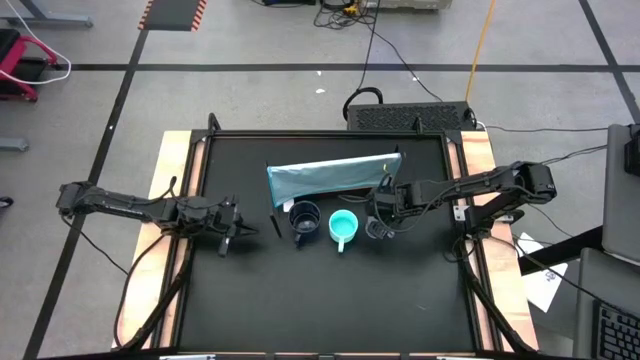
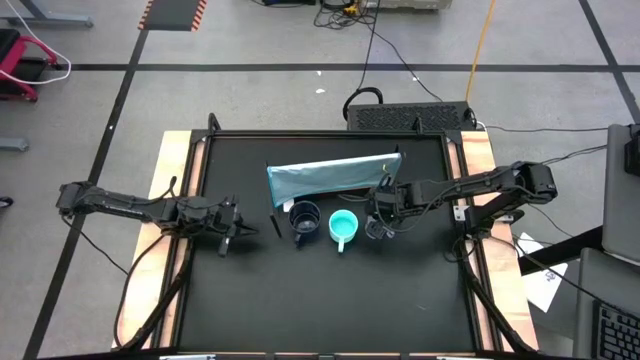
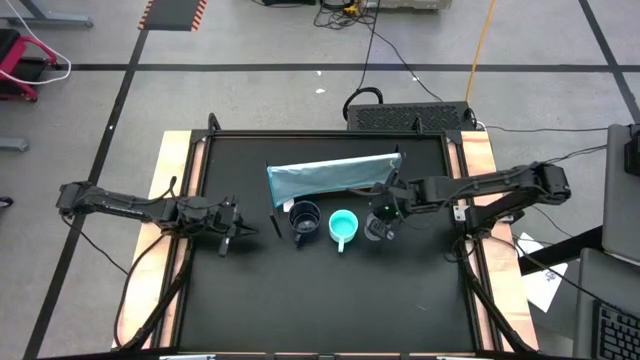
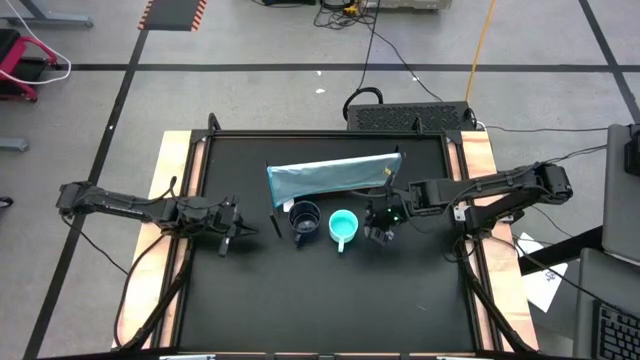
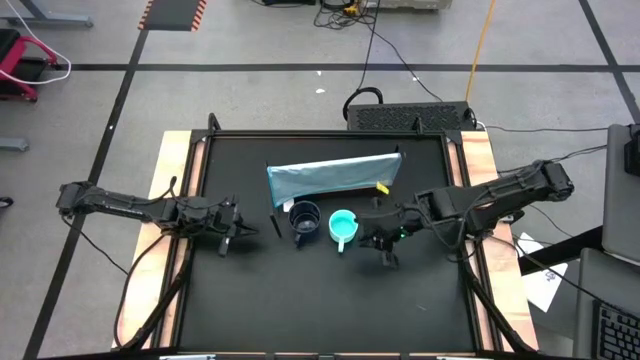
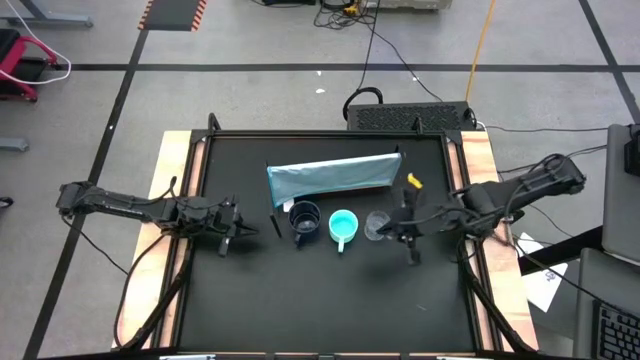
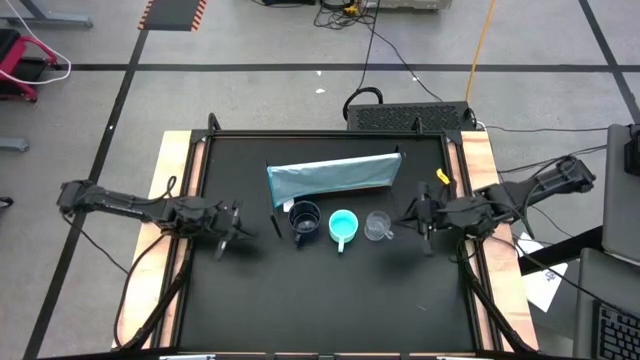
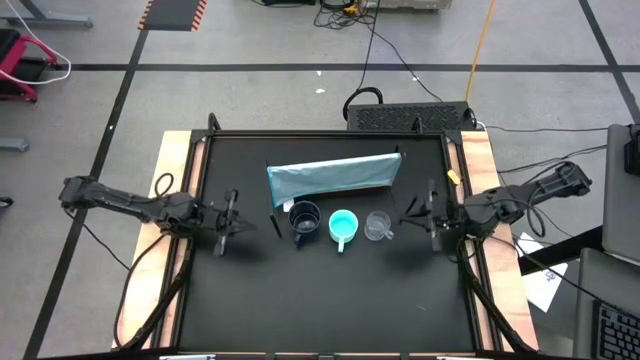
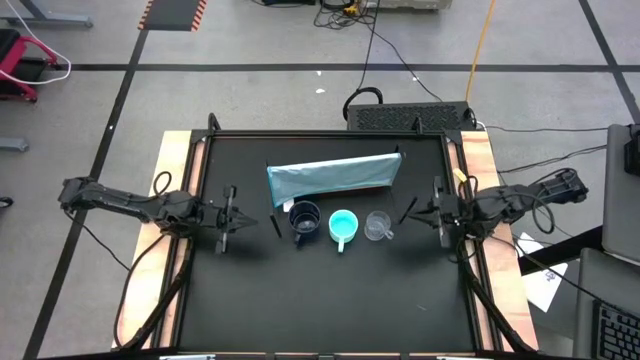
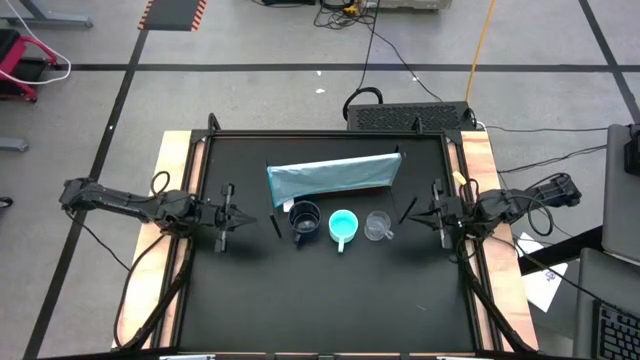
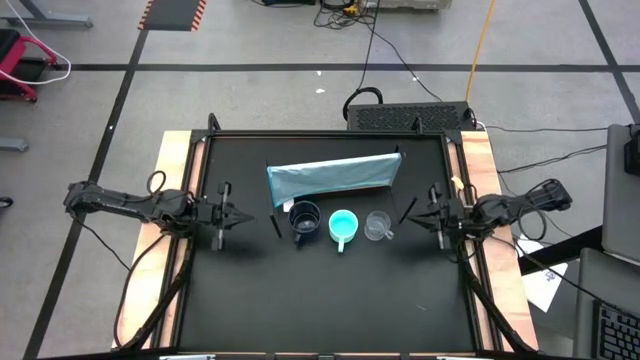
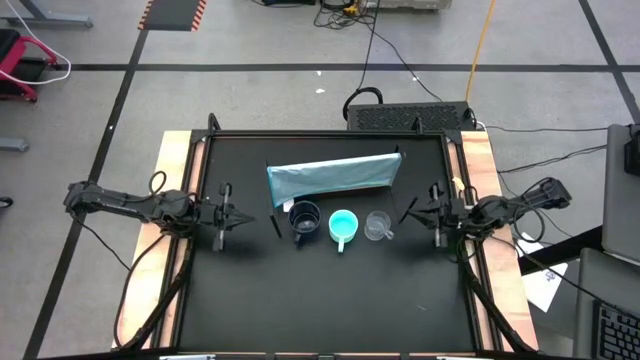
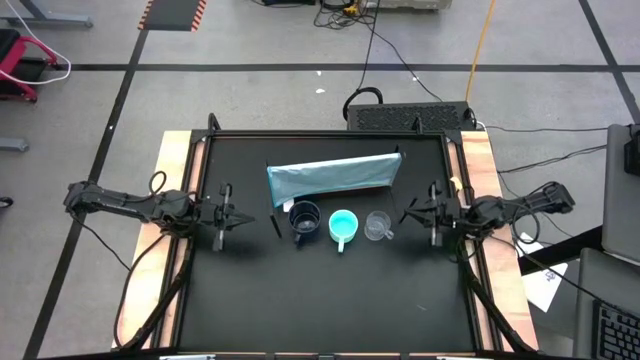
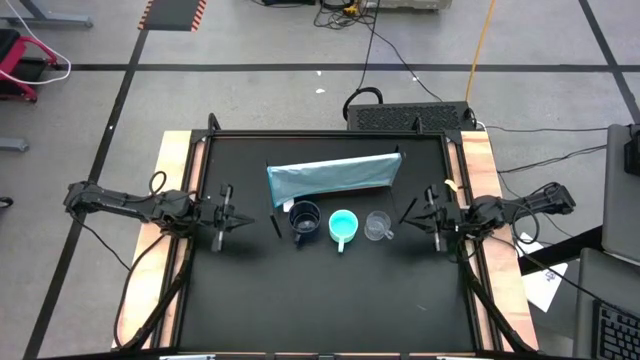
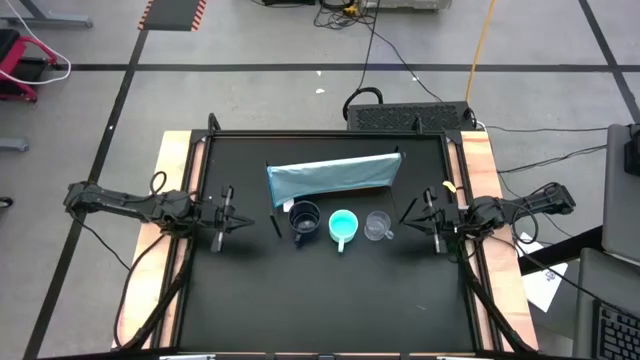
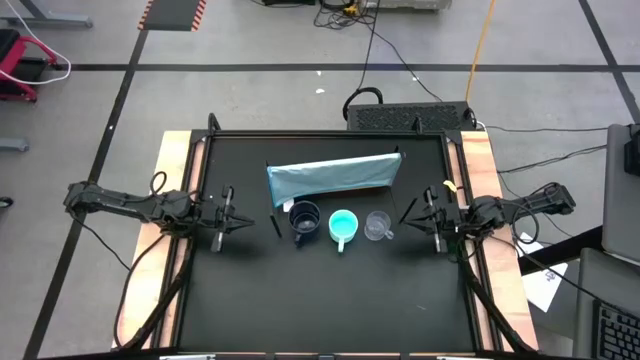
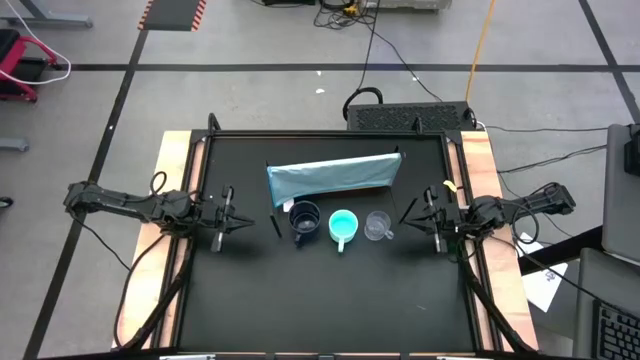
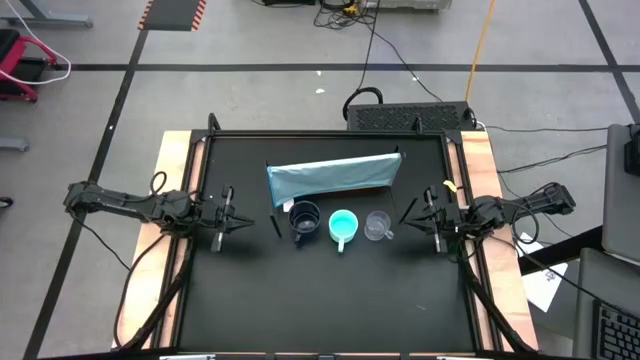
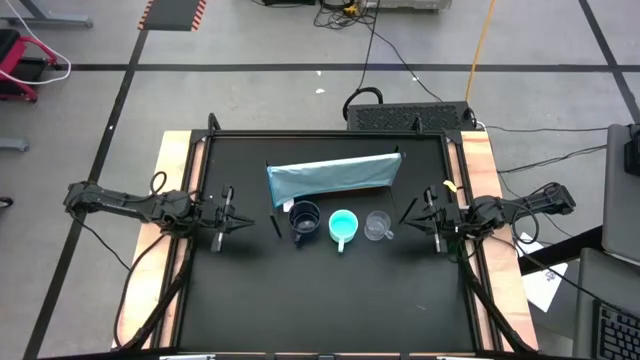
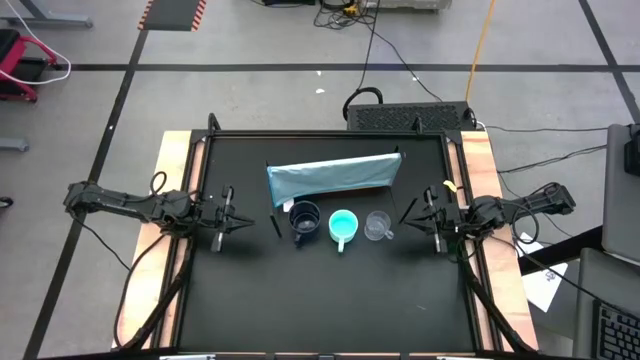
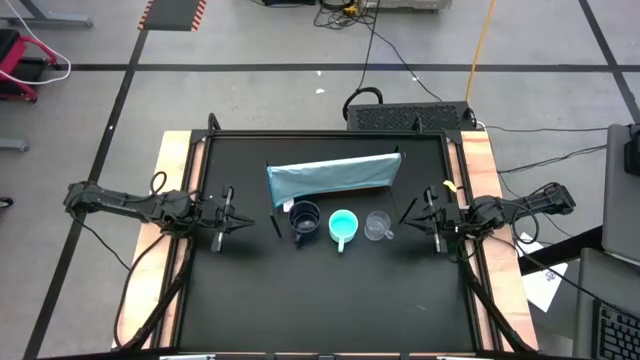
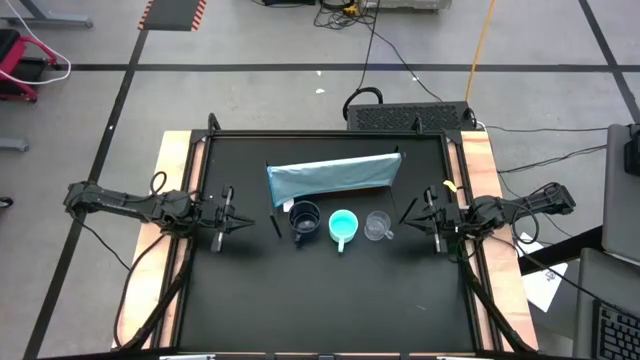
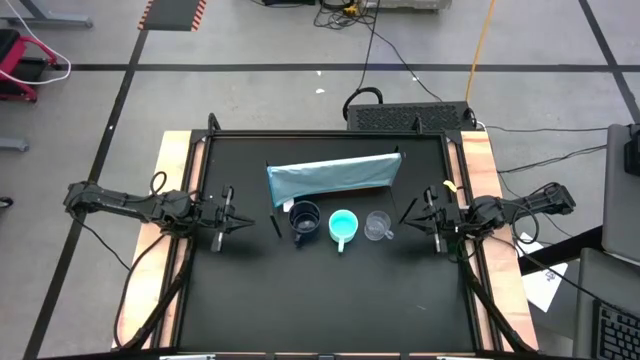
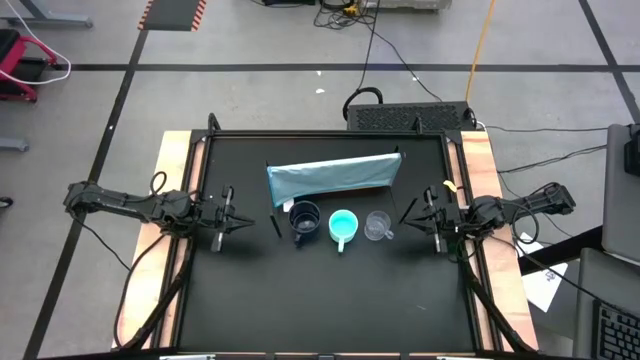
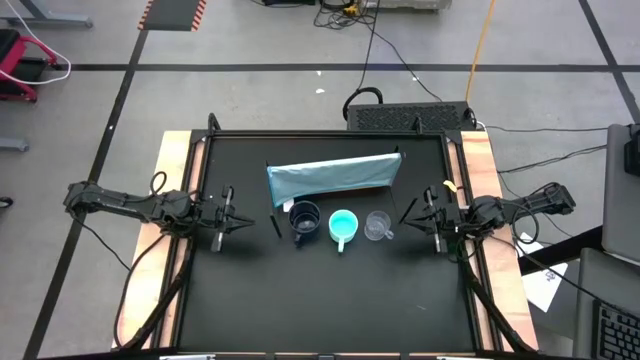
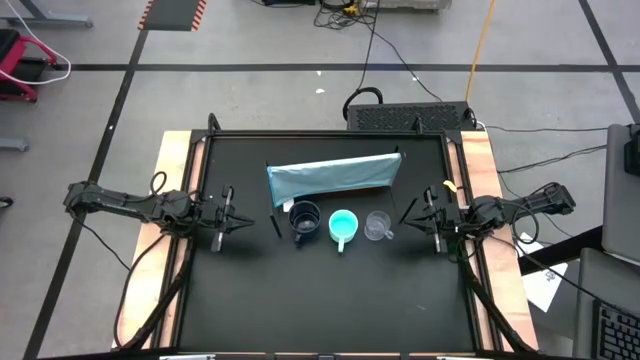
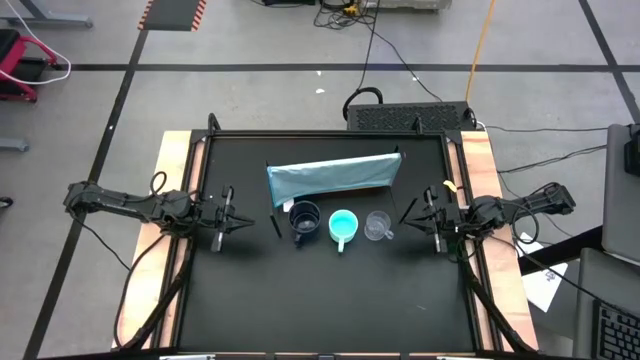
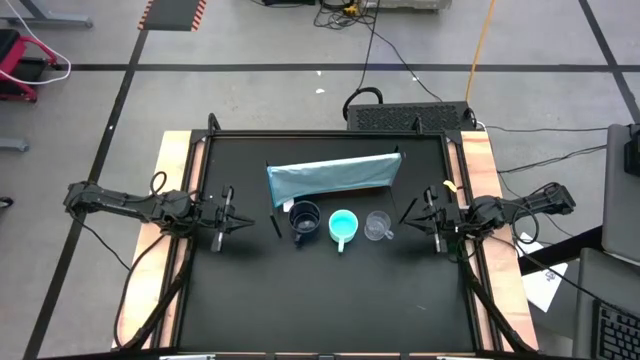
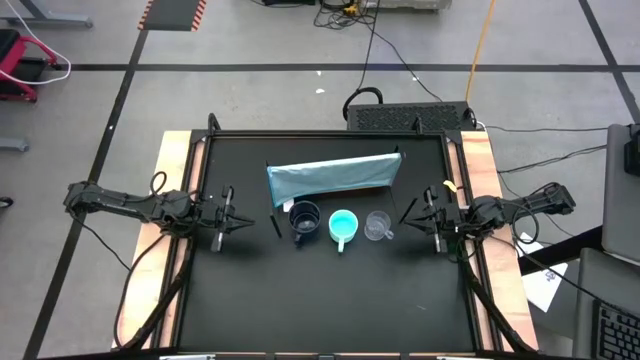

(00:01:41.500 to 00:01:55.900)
Task: Stack small to large cups/mugs on shelf
Return to Home Position

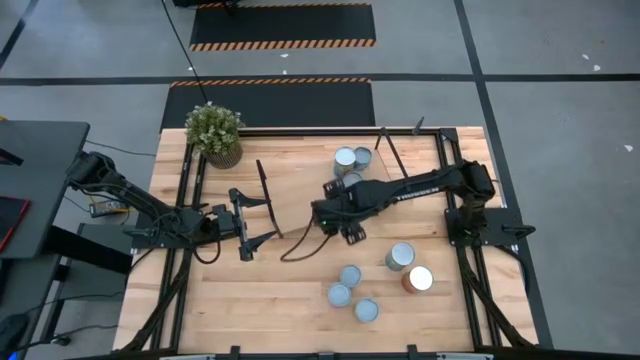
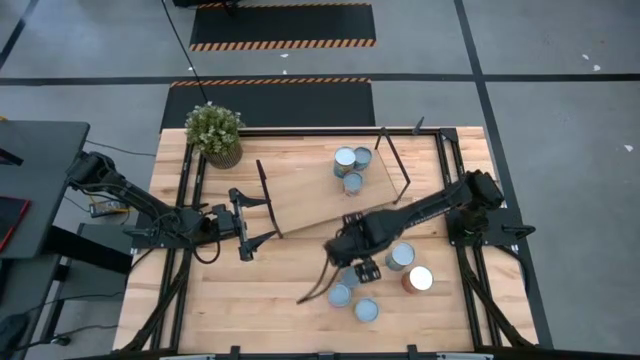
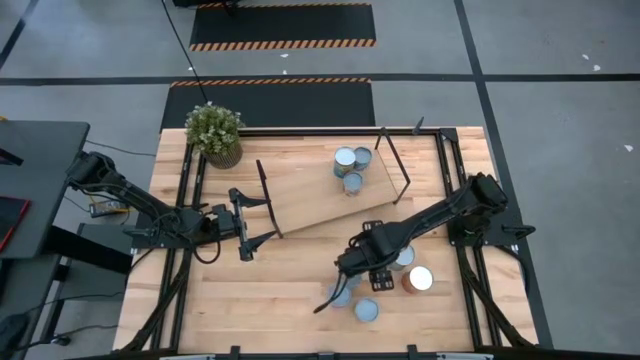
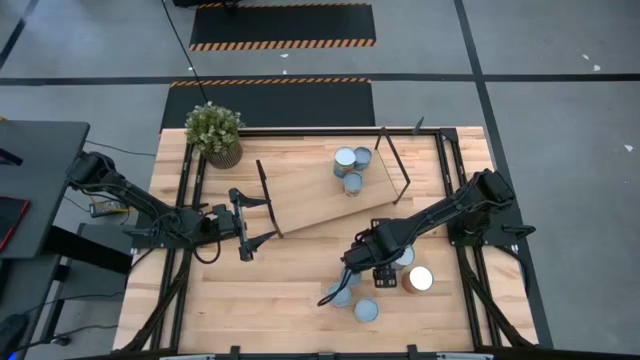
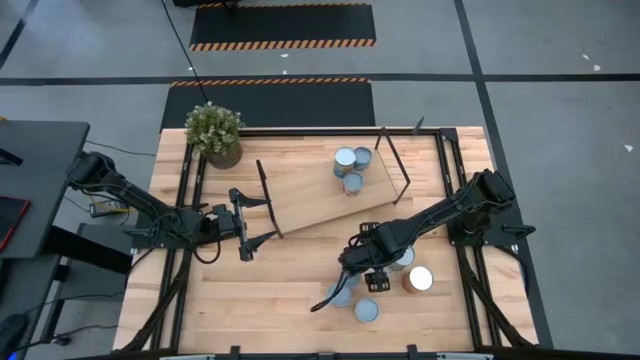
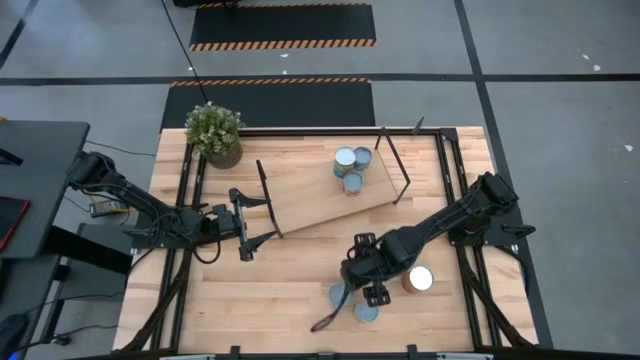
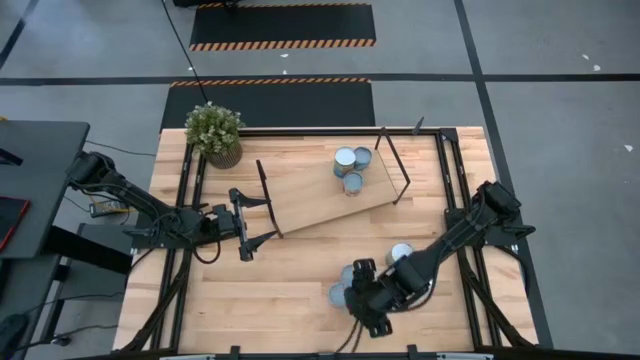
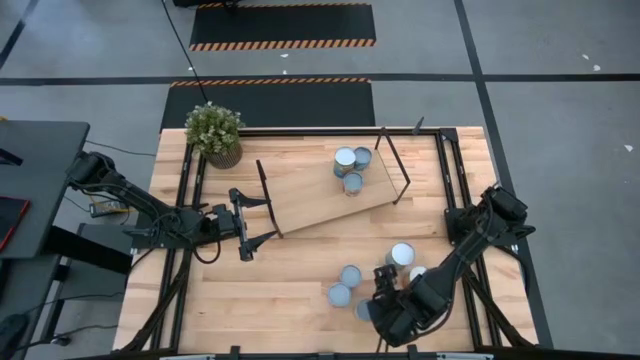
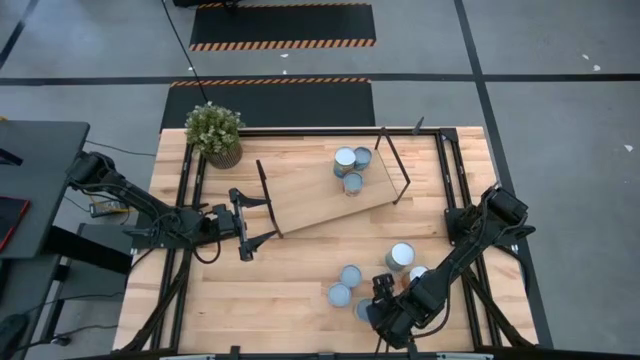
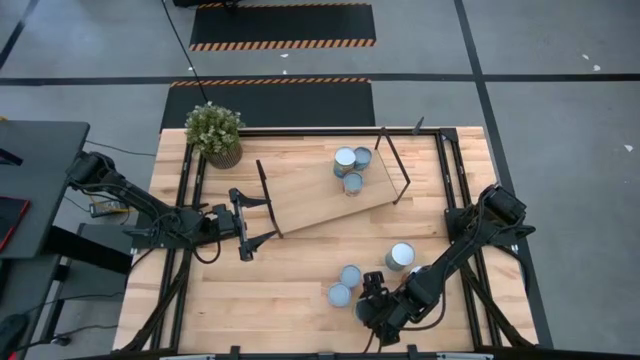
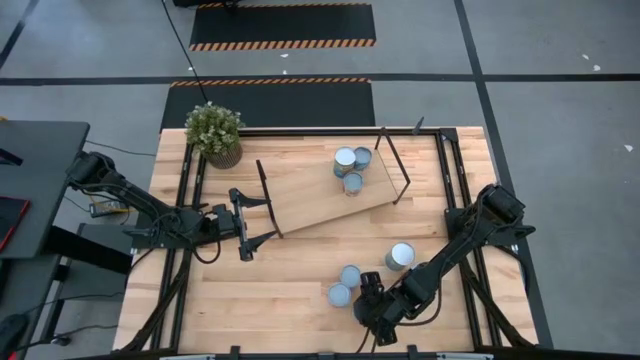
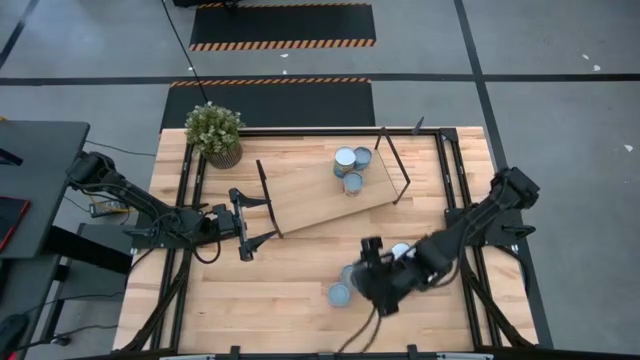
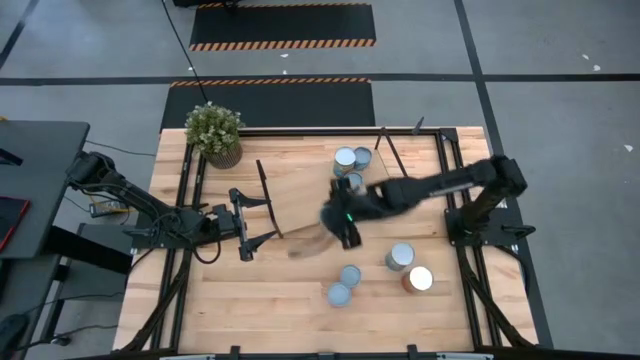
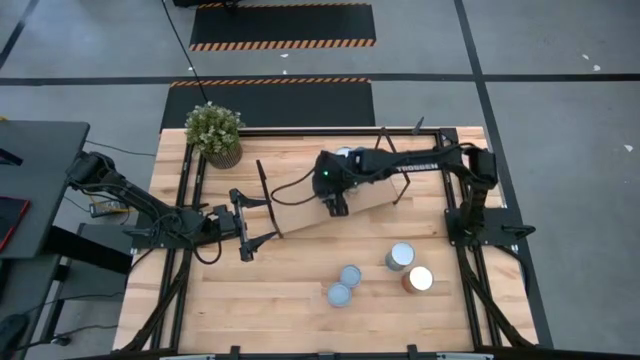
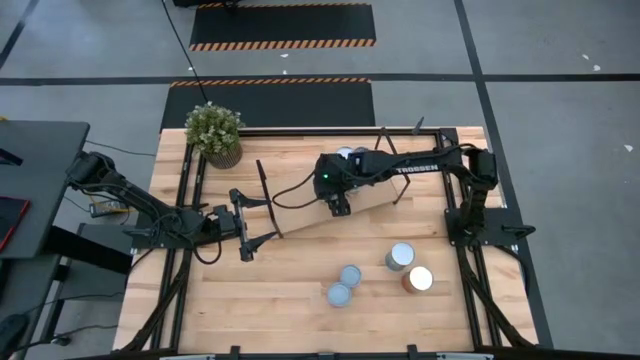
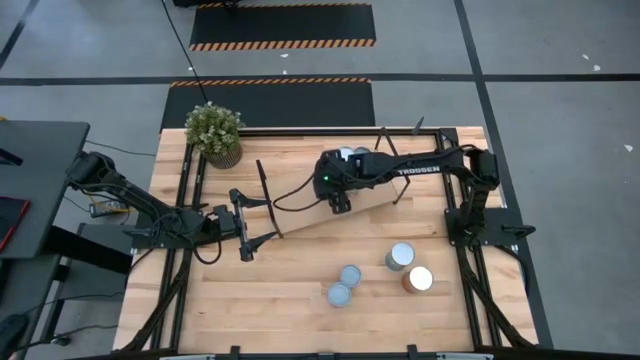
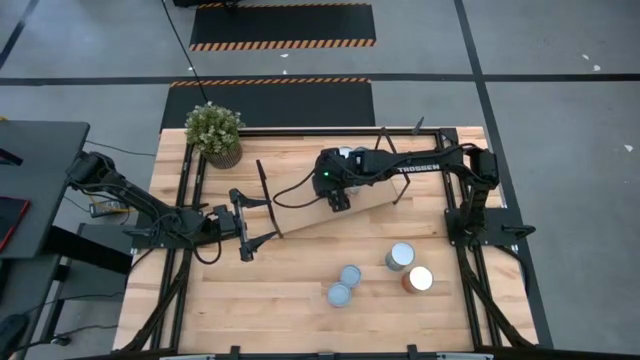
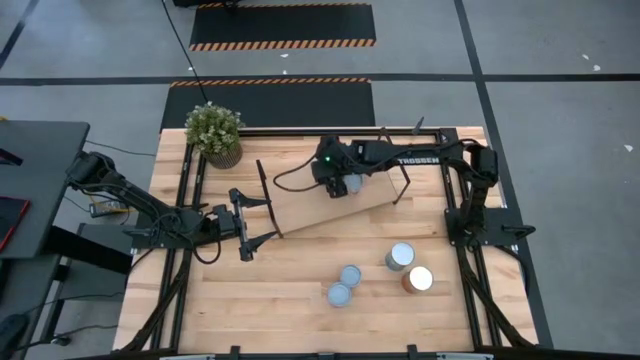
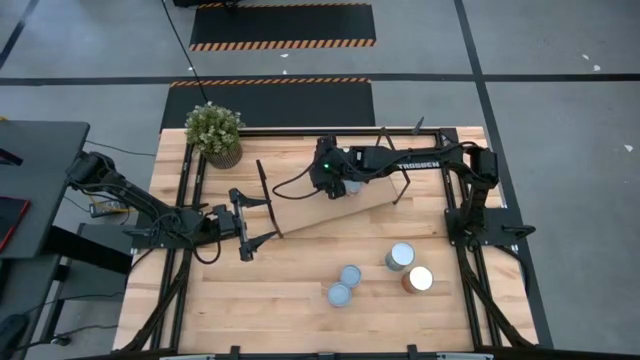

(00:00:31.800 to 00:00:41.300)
Task: Pick and place cans onto a shelf
Put the green can on the shelf
